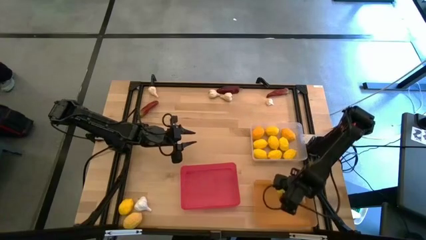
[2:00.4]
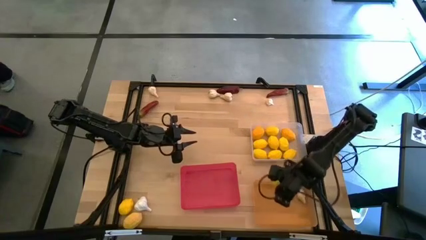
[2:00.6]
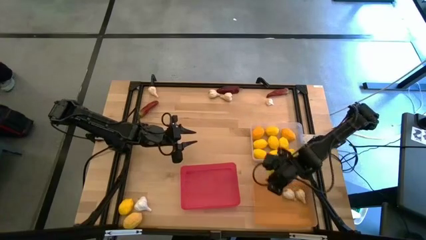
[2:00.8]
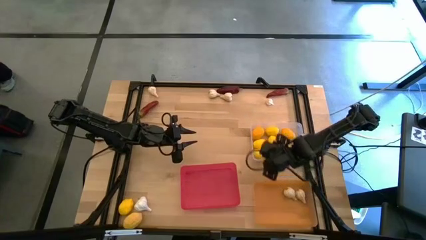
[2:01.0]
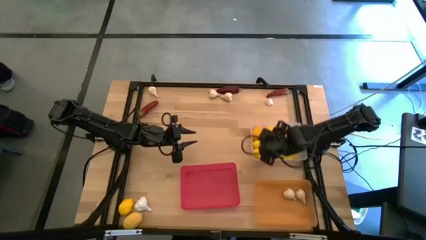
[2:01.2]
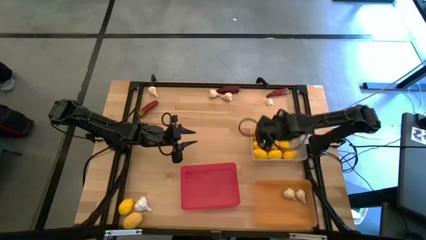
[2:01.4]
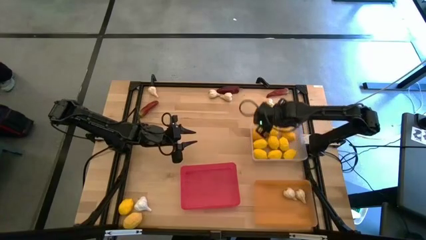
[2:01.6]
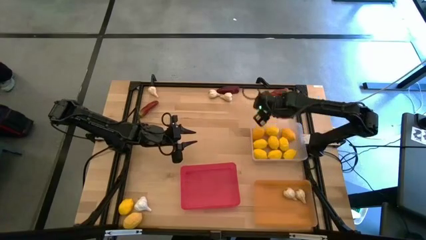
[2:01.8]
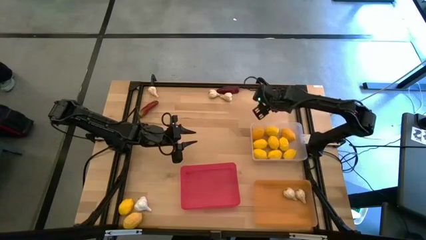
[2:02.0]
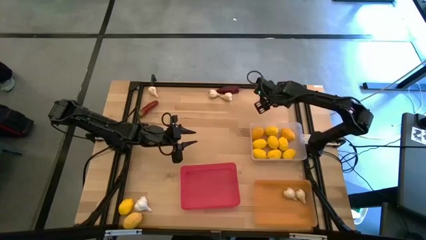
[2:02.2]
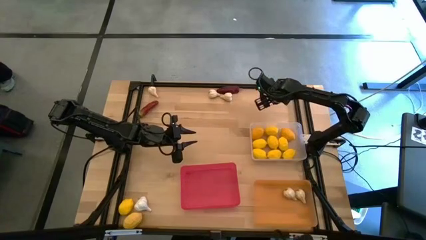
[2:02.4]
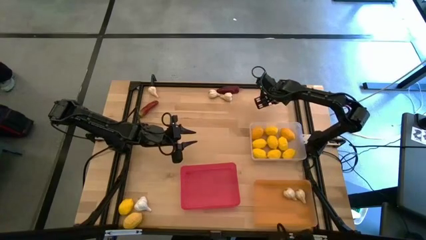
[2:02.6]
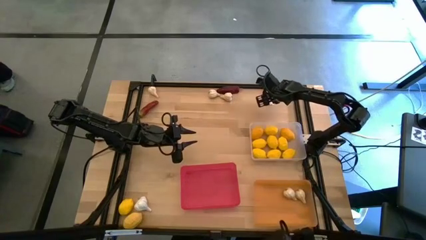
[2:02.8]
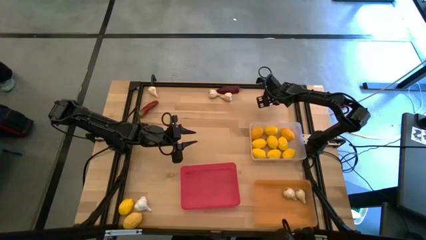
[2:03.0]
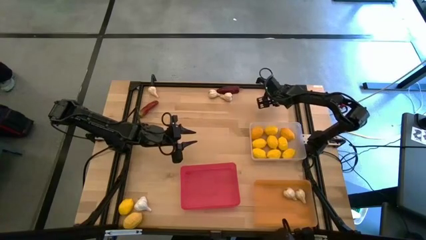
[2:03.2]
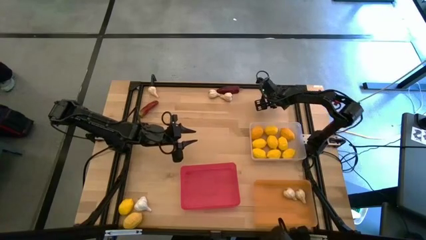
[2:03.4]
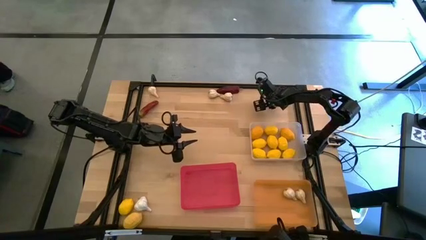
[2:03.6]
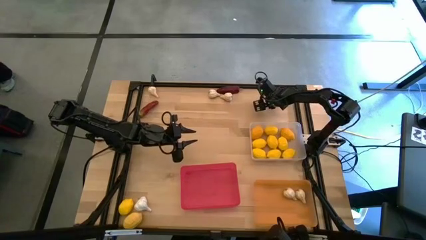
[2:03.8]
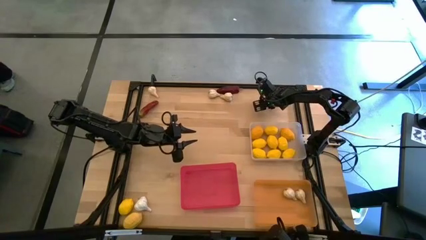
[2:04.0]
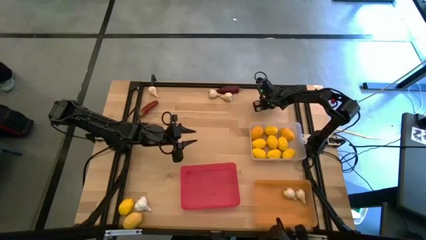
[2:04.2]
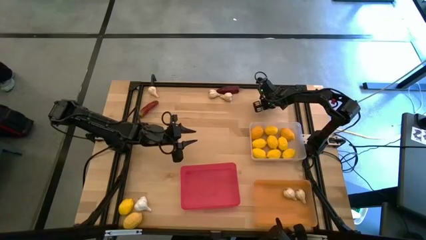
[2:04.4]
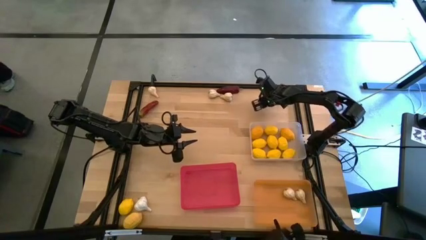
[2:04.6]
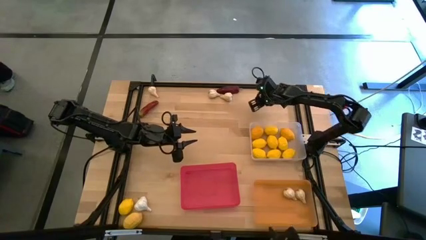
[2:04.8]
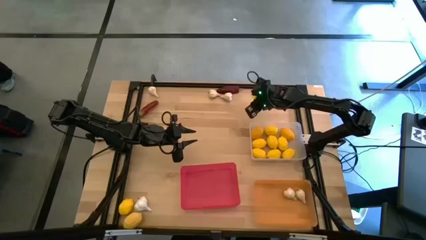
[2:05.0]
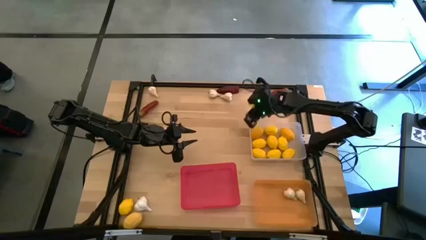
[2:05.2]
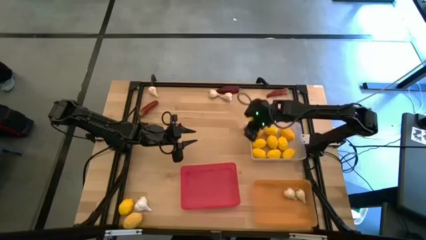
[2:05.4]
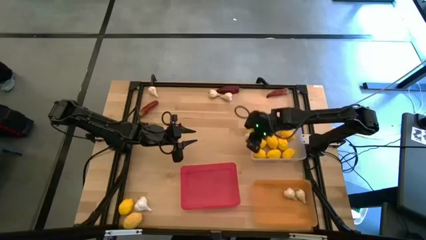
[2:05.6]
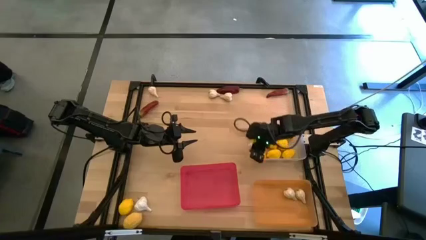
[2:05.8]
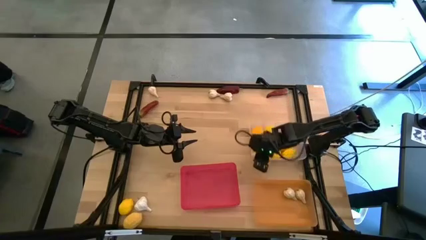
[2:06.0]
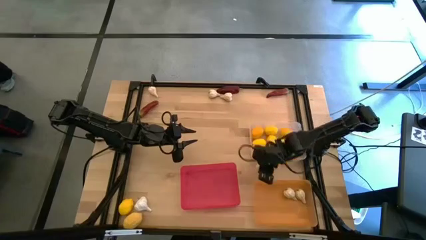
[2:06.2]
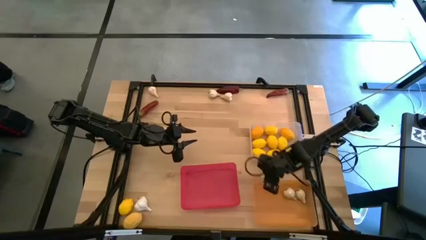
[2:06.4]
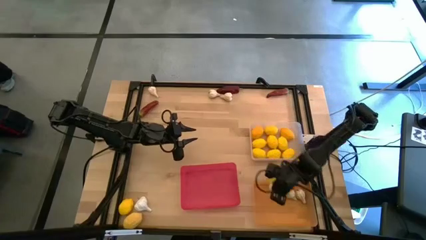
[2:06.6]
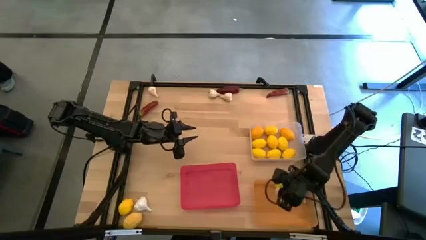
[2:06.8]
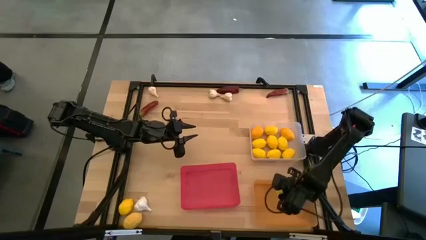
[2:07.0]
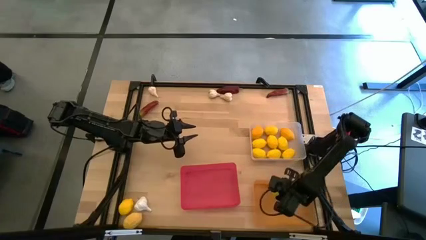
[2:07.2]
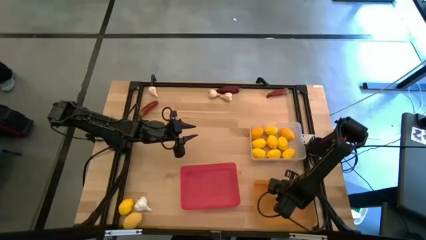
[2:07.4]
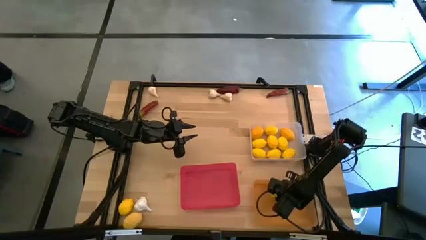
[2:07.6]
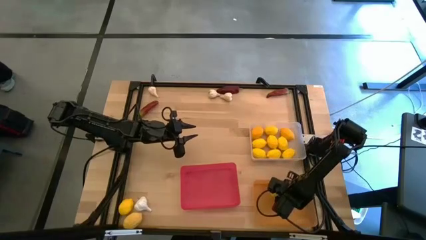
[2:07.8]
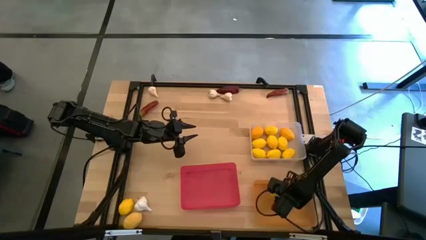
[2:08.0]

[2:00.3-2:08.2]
Task: Sort produce into baskets
Put the white garlic into the orange bin

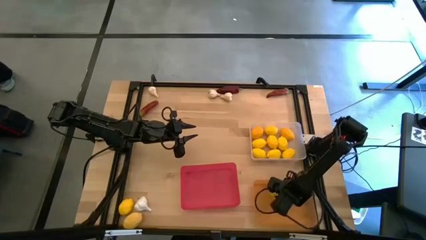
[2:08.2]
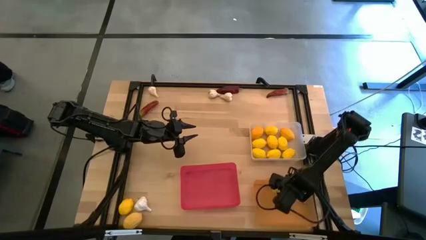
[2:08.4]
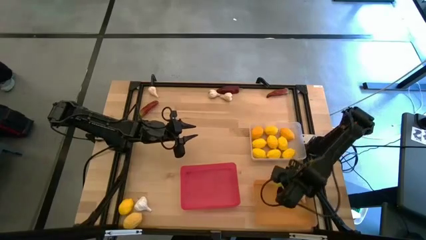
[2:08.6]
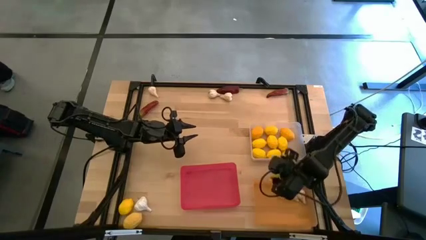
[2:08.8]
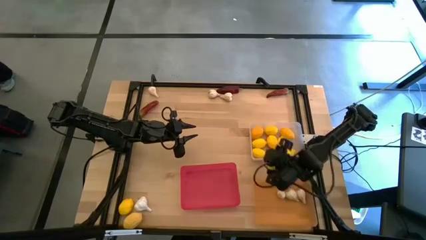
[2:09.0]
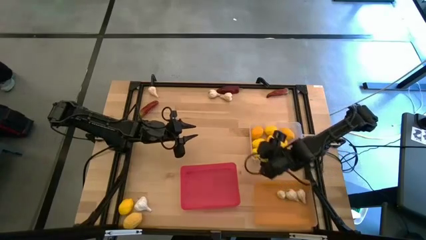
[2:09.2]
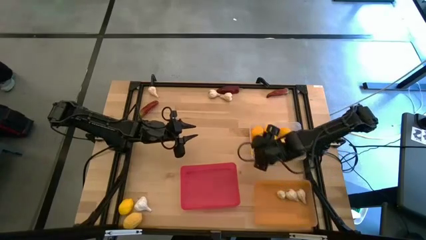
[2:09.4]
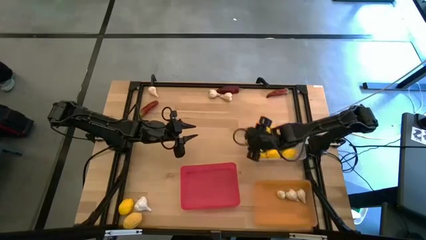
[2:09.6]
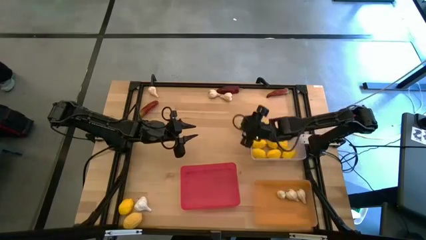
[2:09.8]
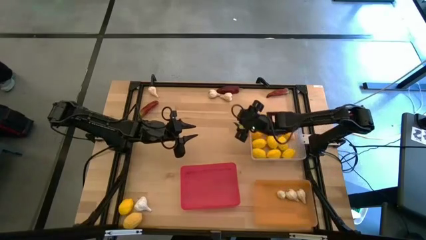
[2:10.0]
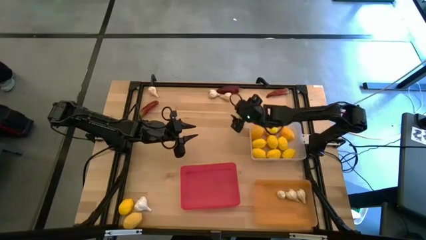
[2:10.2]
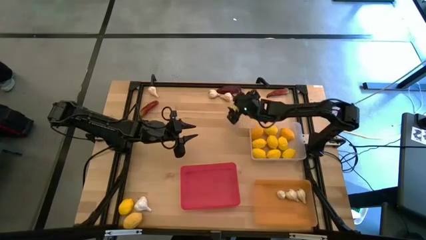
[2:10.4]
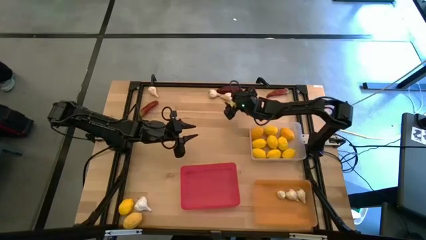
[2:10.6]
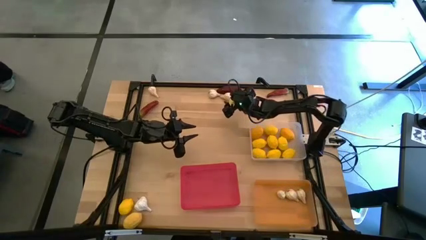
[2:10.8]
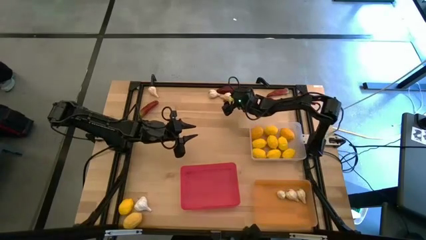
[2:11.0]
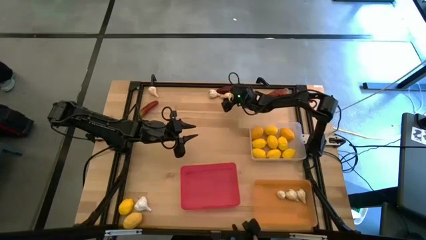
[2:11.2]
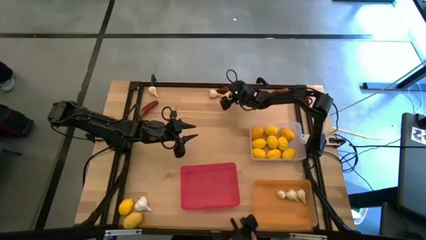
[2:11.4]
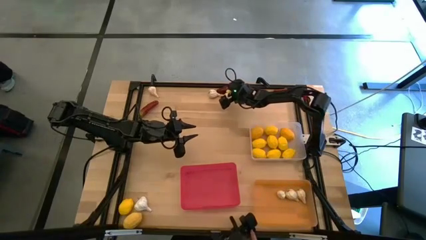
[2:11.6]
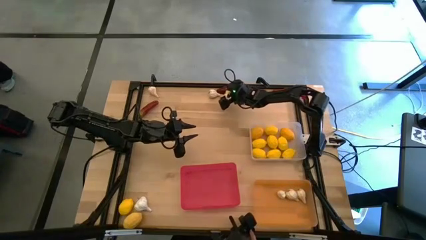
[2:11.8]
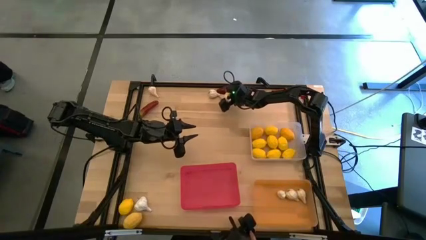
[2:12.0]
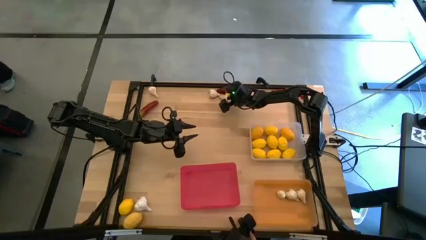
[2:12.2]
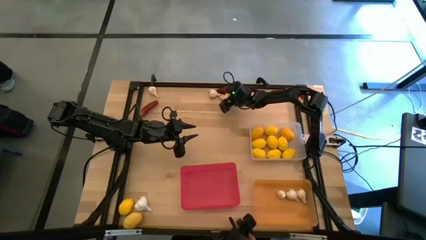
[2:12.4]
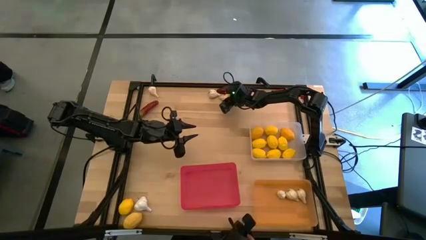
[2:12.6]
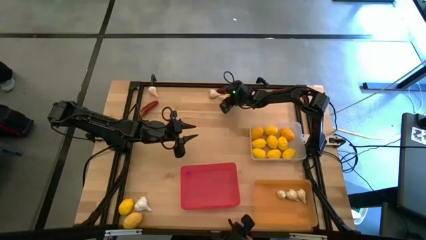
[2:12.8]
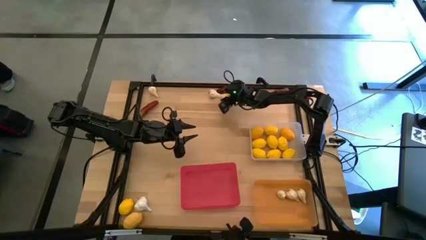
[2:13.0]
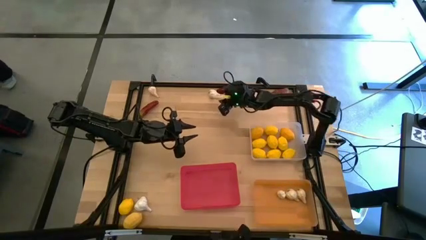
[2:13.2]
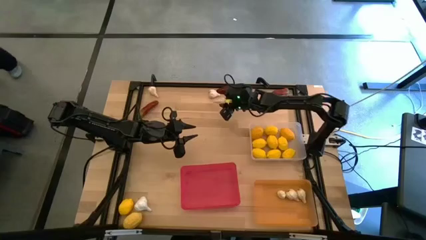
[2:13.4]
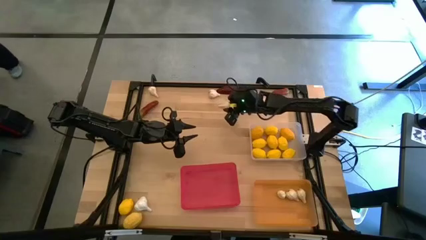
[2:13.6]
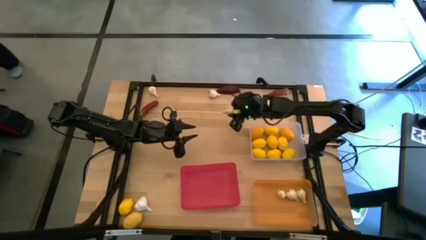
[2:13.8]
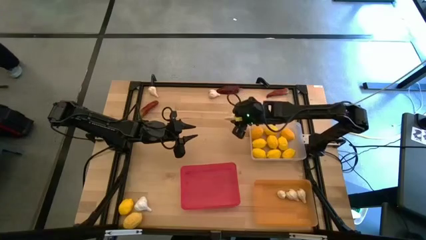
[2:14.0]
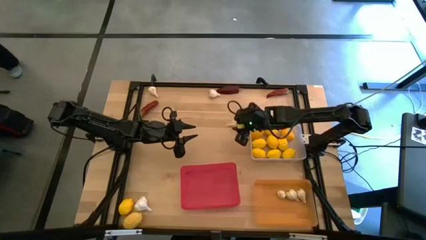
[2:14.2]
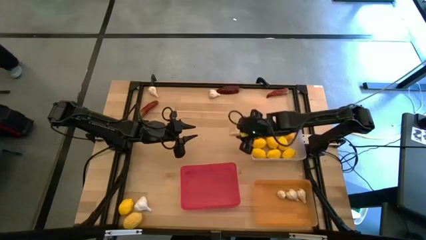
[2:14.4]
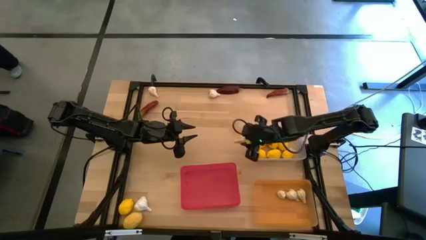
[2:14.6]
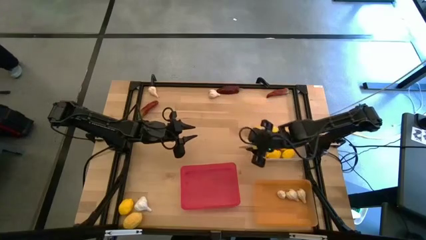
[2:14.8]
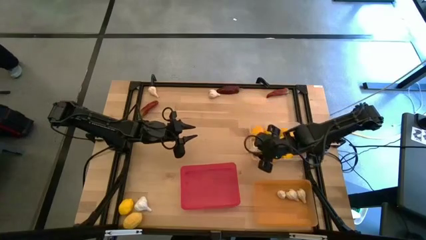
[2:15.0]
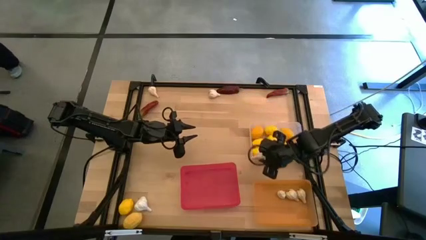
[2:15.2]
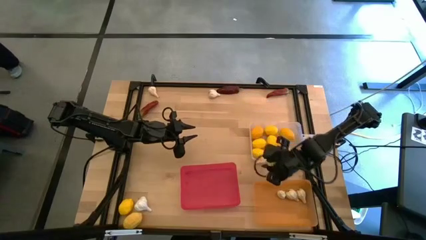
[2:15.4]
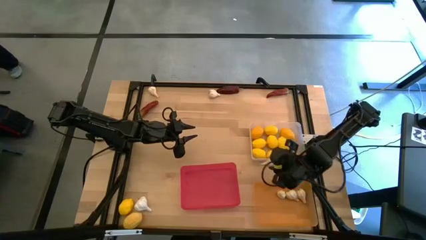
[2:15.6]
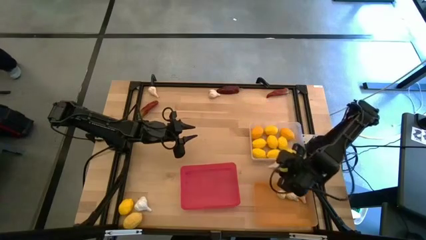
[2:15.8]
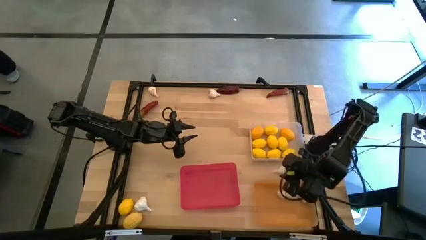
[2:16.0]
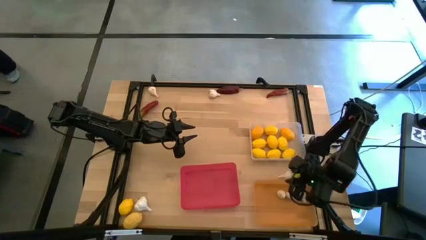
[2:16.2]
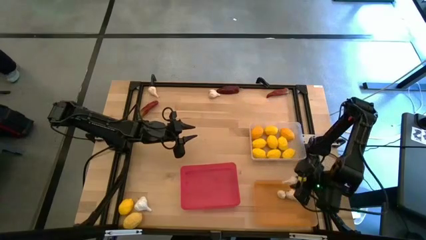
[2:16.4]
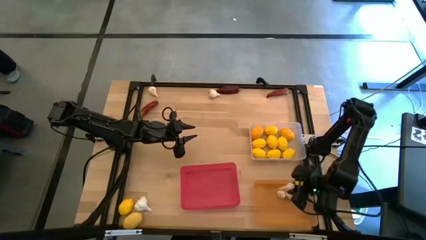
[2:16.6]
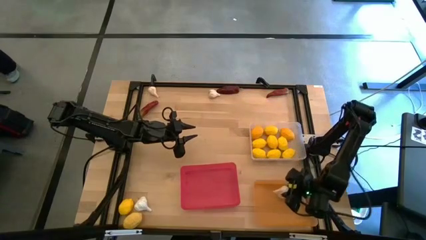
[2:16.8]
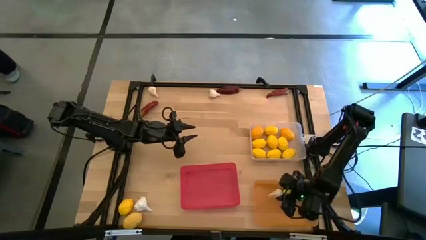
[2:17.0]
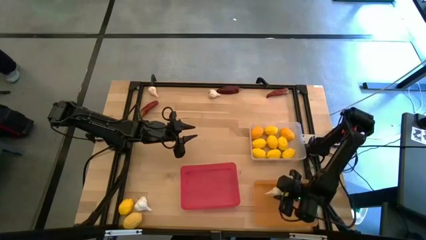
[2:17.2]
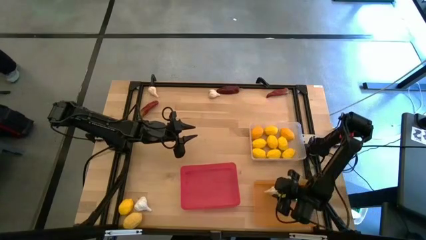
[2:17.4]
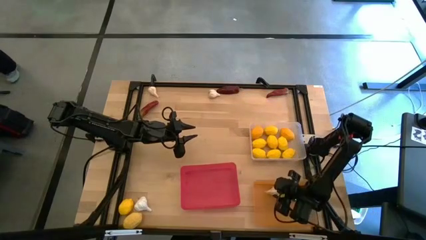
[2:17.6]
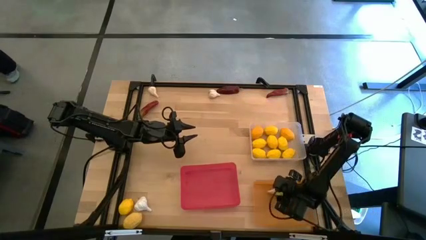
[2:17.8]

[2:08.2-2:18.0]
Put the white garlic into the orange bin
